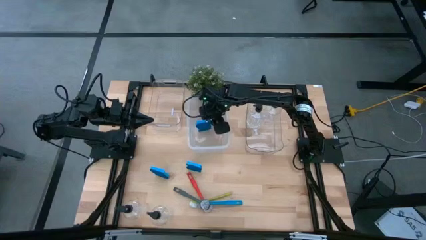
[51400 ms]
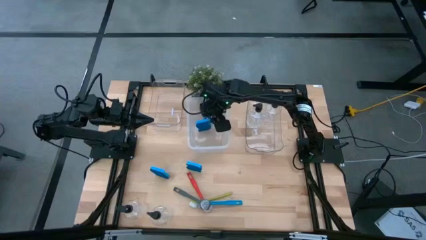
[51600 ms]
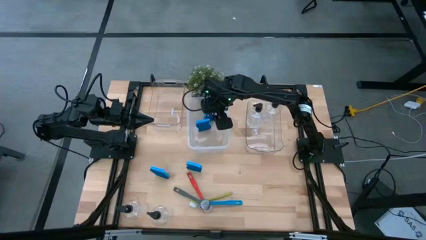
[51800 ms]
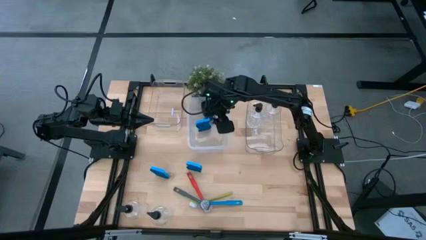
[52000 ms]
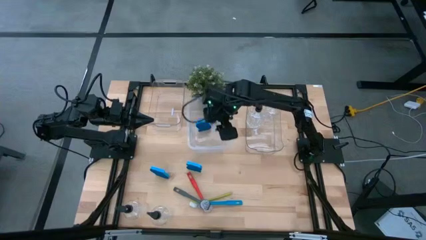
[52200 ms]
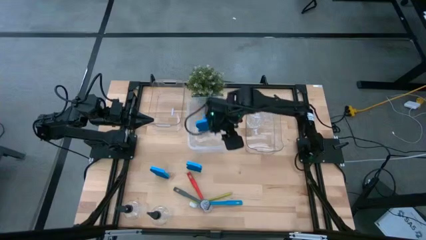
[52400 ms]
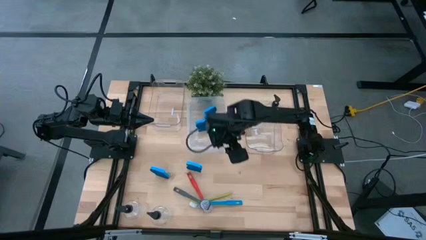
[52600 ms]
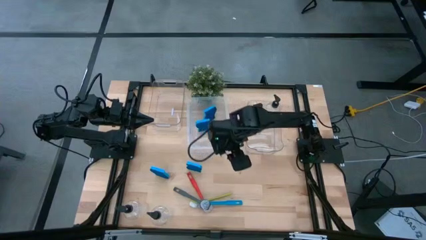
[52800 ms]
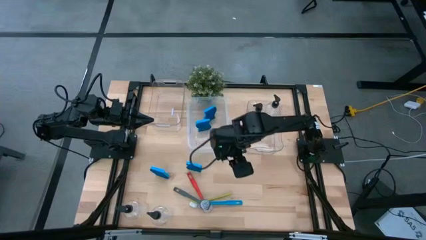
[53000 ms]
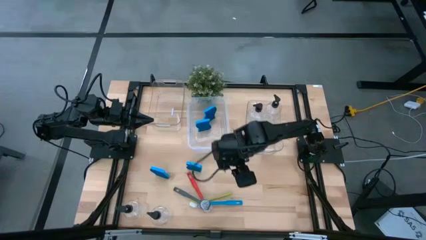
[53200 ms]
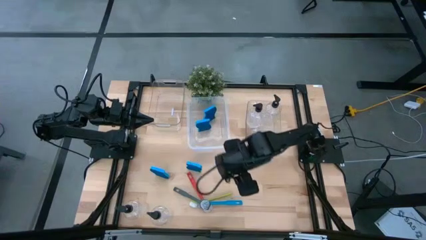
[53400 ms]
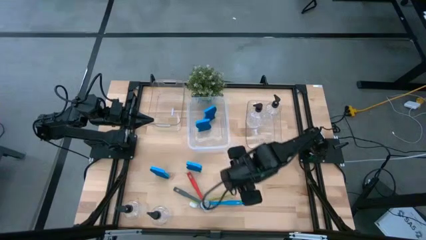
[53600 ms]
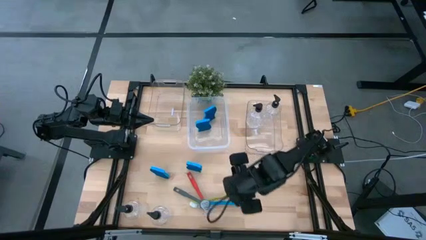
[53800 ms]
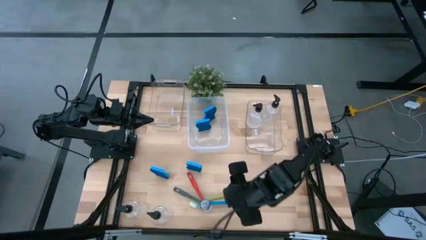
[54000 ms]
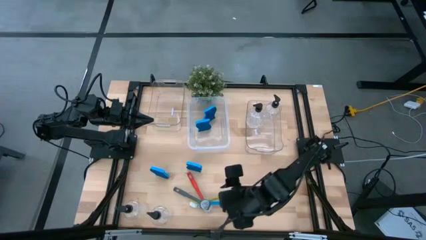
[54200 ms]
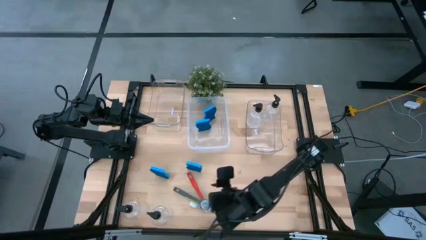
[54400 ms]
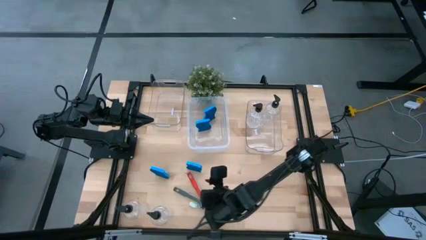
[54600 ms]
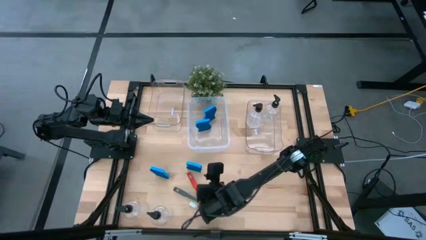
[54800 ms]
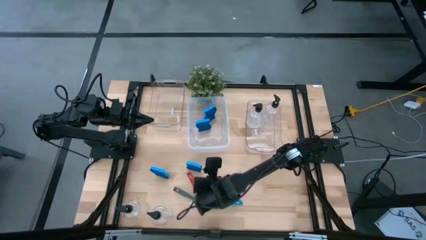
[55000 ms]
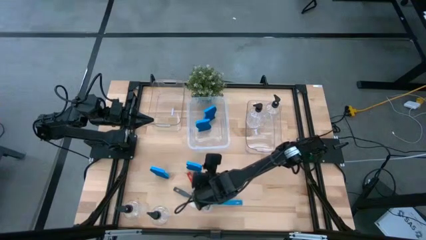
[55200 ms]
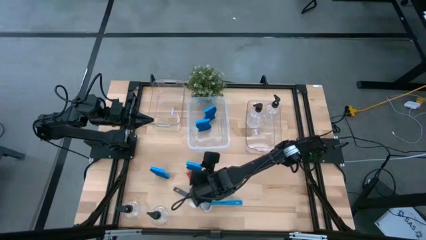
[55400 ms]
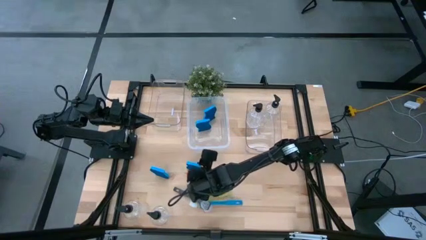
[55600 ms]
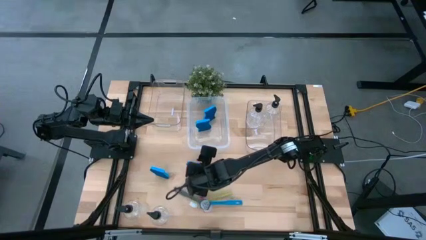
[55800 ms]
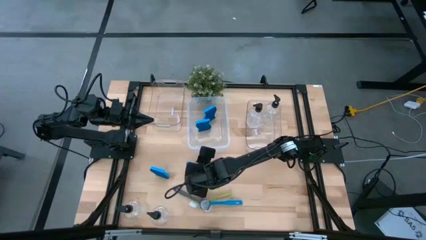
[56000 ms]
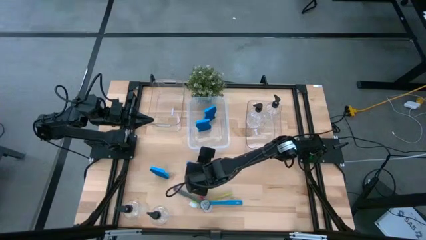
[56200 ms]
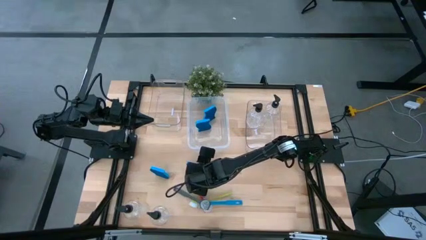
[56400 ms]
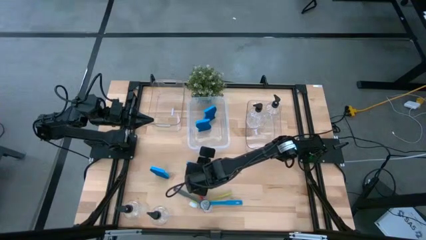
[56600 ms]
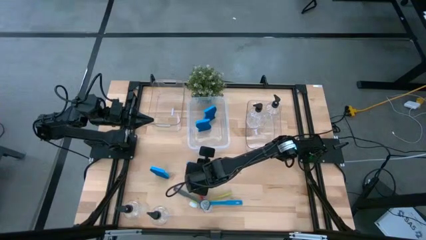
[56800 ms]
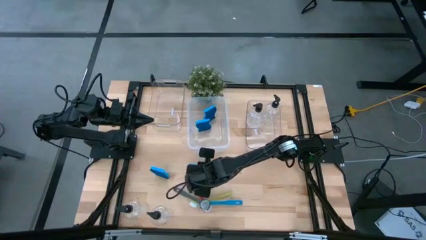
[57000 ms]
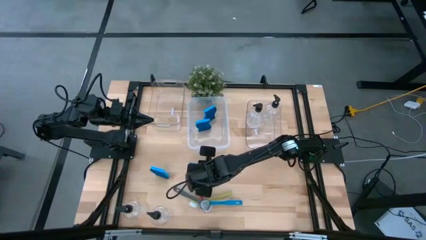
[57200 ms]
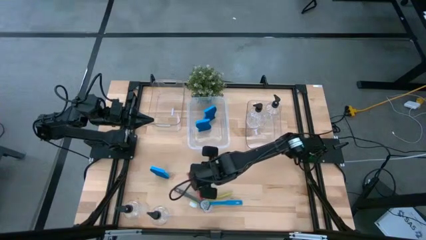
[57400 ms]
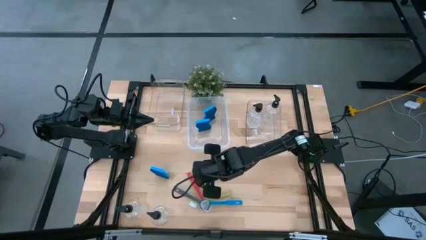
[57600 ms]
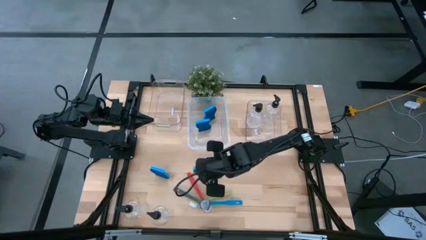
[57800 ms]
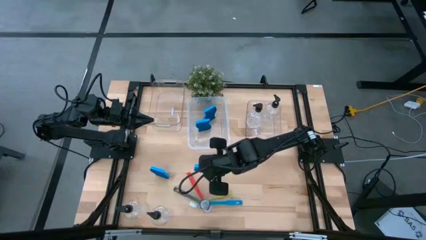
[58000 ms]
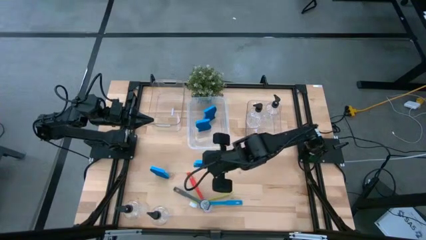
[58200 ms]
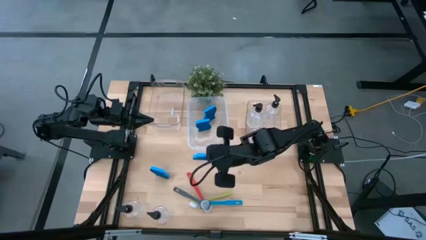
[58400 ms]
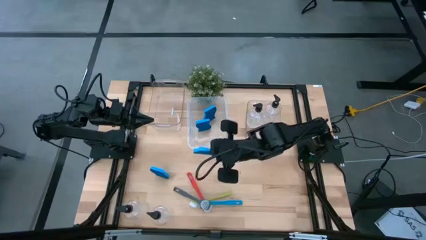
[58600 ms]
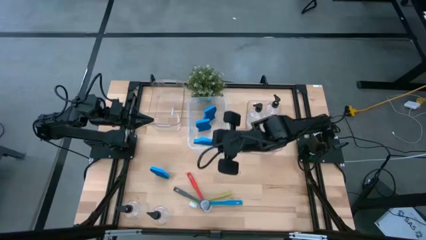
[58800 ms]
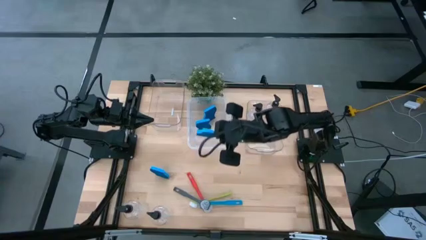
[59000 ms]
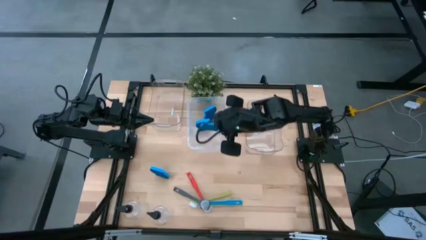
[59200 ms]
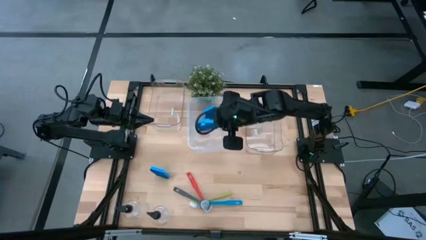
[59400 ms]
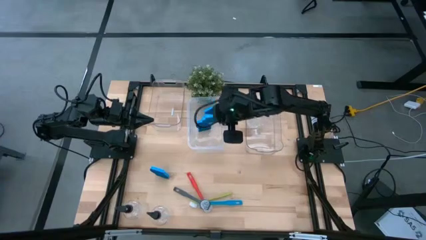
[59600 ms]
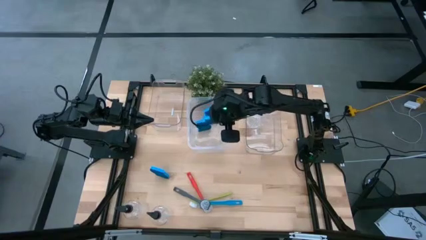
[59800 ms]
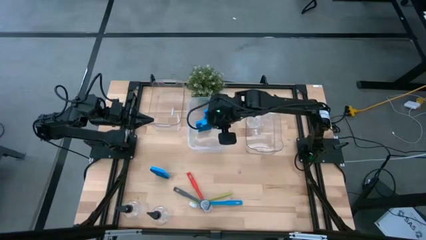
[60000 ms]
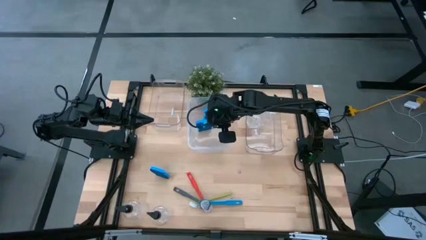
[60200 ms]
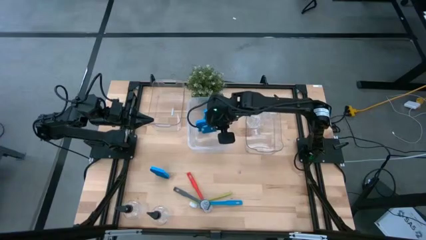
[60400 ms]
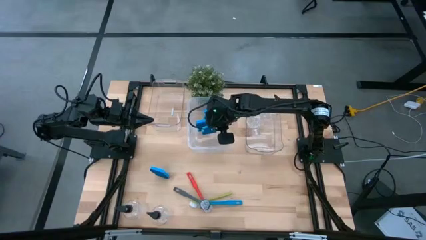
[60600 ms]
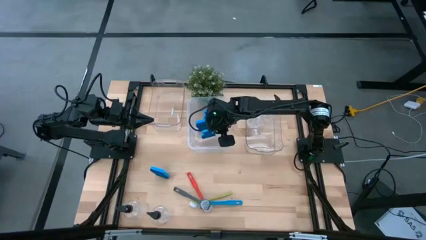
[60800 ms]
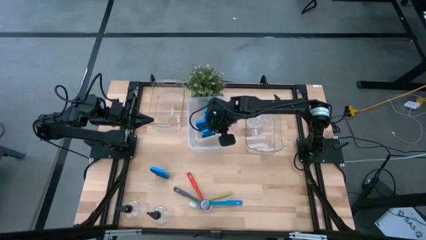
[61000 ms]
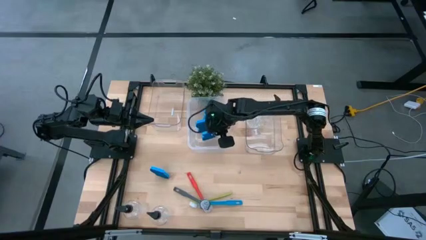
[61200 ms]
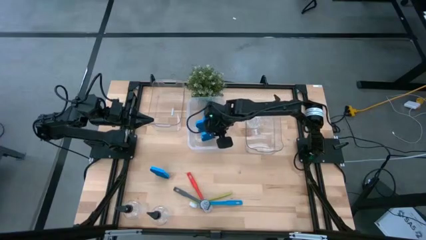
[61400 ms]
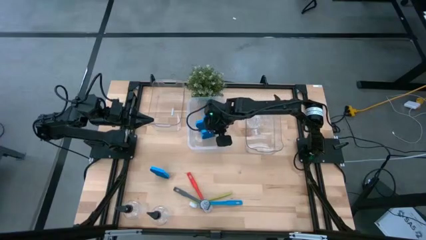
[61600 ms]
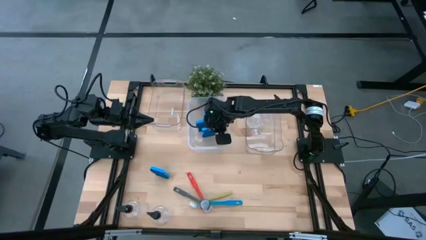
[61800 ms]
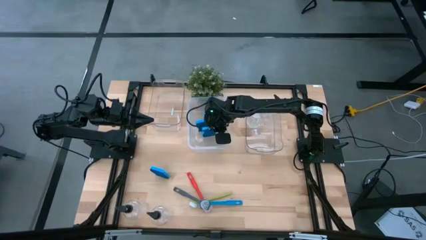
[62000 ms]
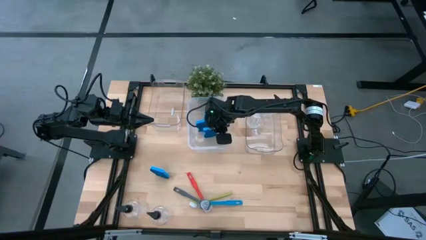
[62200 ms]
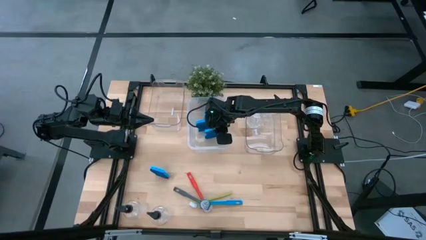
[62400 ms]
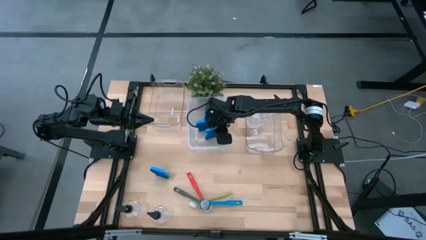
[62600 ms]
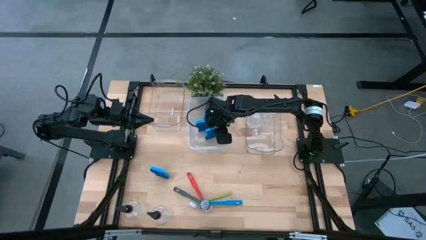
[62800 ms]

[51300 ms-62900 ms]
Task: Pick & Place Kitchen Sink Supplies
Put the blue sponge into the middle transparent bin
